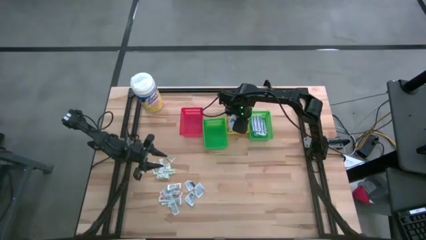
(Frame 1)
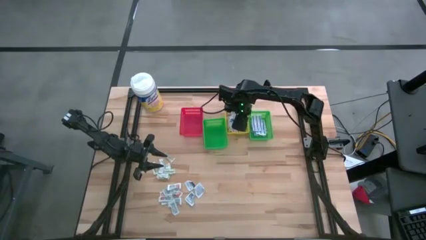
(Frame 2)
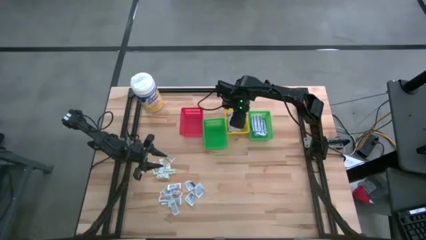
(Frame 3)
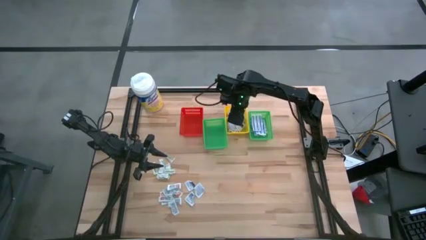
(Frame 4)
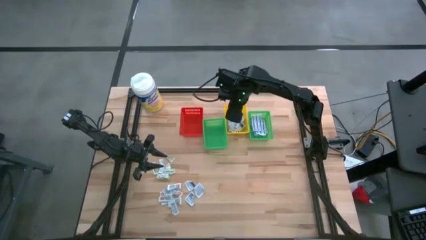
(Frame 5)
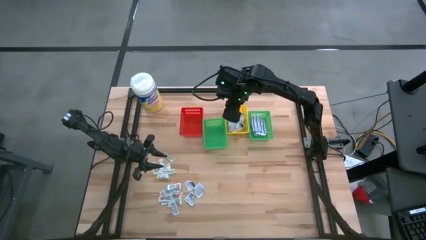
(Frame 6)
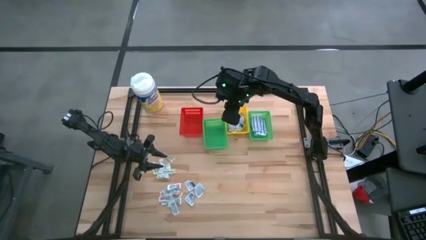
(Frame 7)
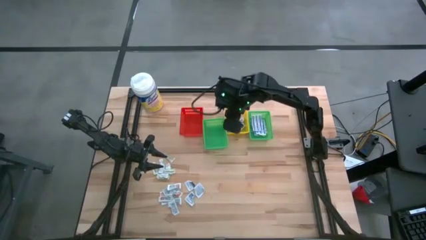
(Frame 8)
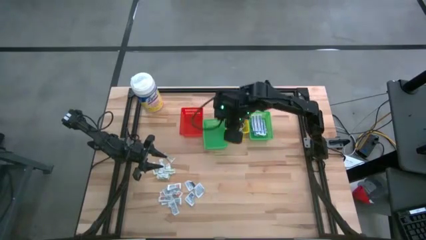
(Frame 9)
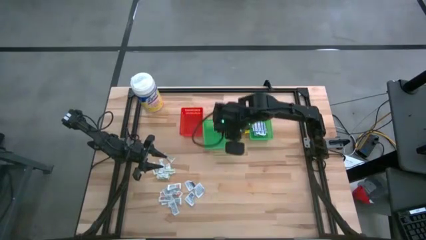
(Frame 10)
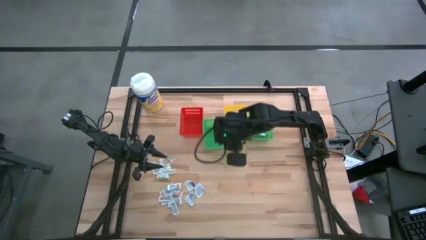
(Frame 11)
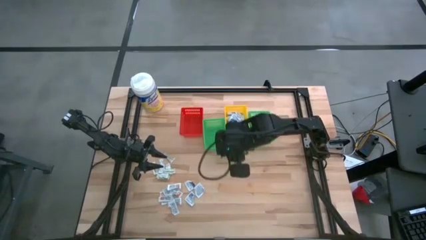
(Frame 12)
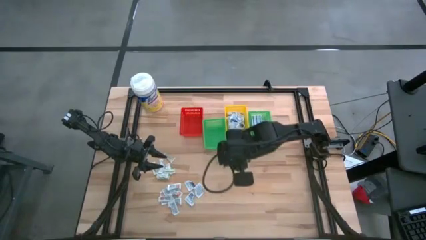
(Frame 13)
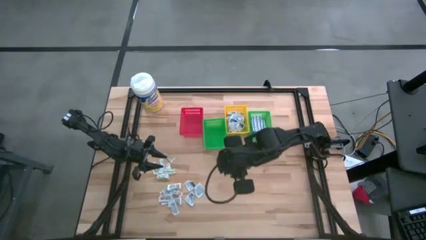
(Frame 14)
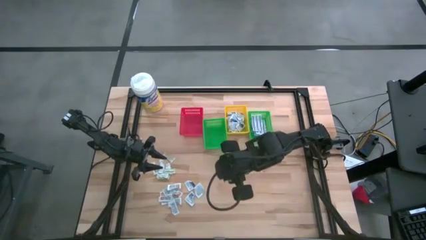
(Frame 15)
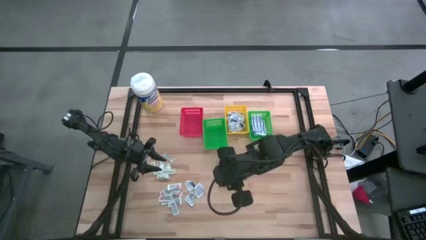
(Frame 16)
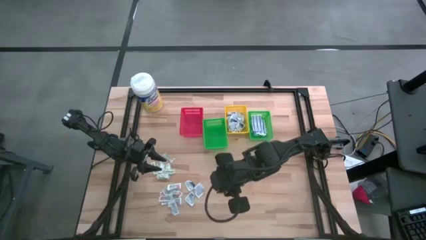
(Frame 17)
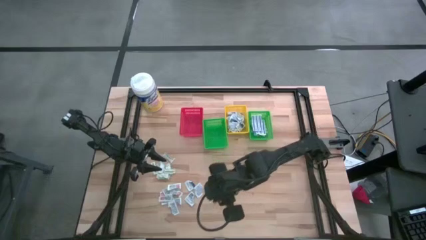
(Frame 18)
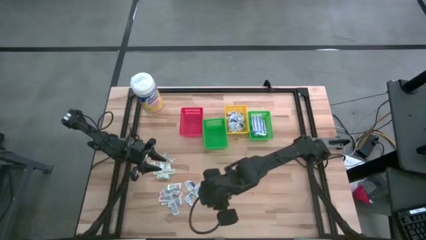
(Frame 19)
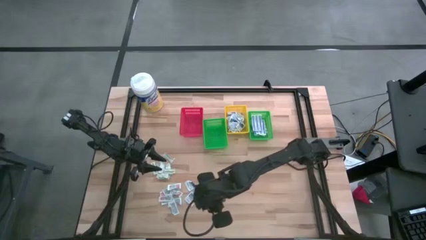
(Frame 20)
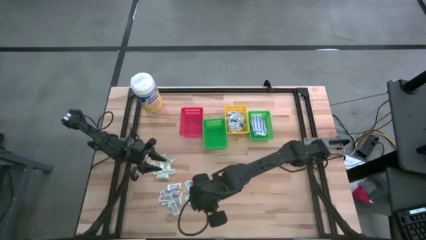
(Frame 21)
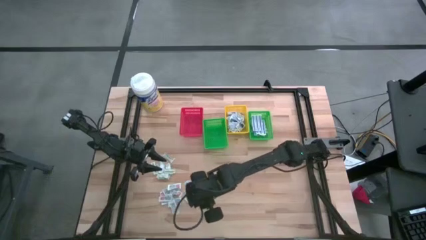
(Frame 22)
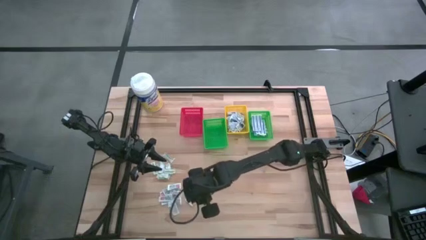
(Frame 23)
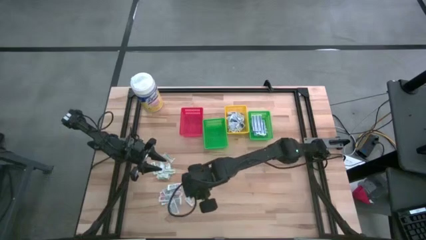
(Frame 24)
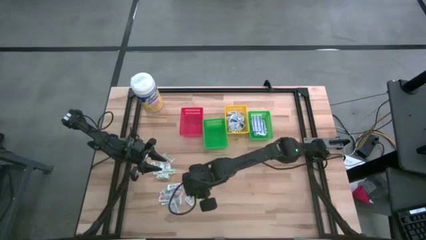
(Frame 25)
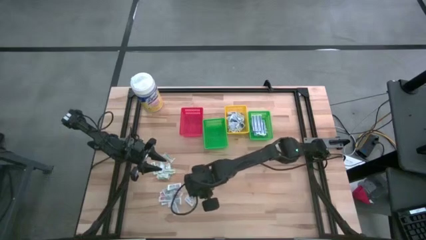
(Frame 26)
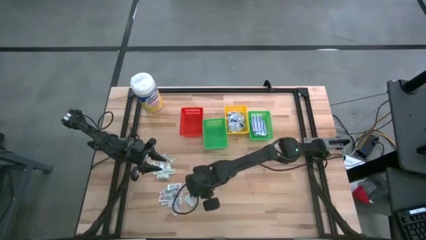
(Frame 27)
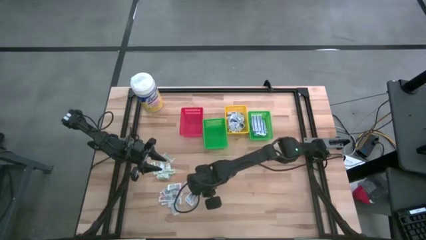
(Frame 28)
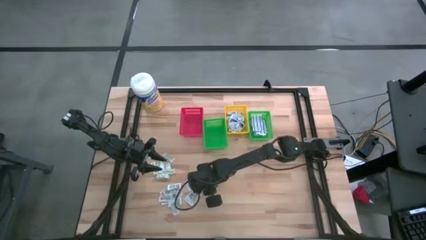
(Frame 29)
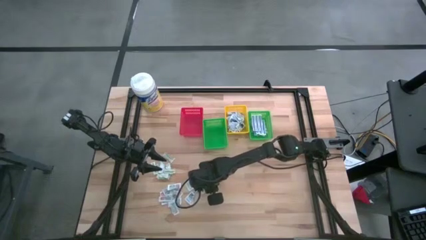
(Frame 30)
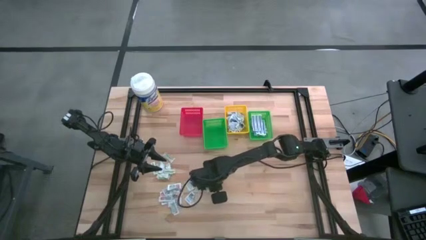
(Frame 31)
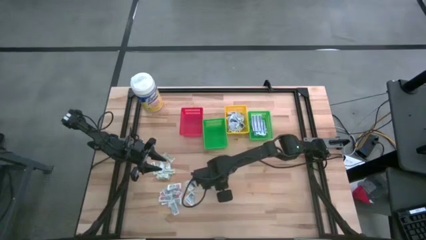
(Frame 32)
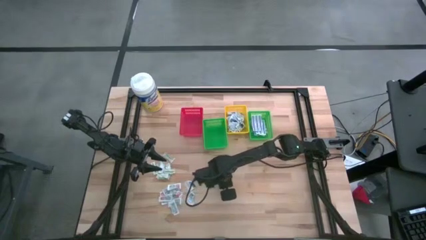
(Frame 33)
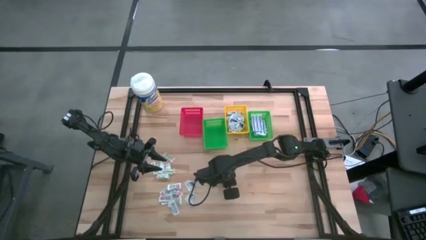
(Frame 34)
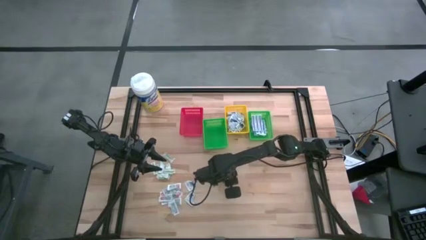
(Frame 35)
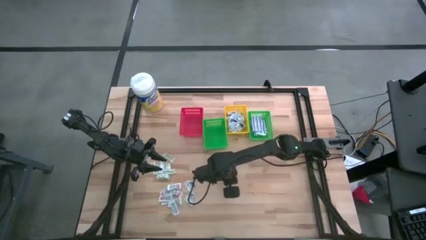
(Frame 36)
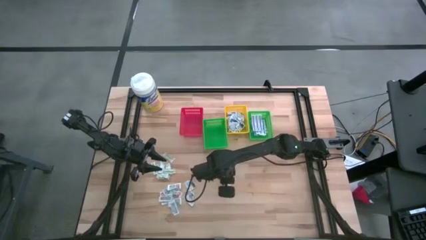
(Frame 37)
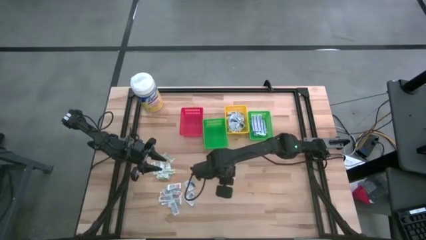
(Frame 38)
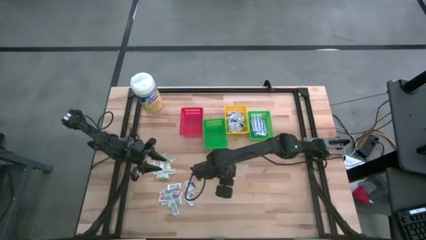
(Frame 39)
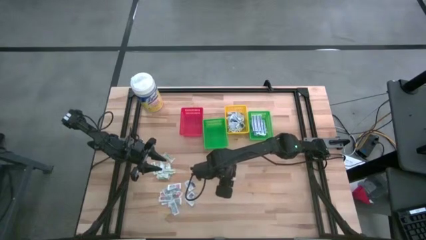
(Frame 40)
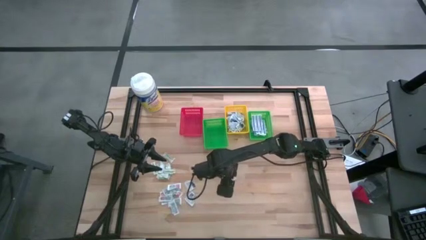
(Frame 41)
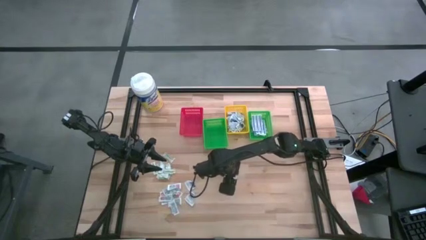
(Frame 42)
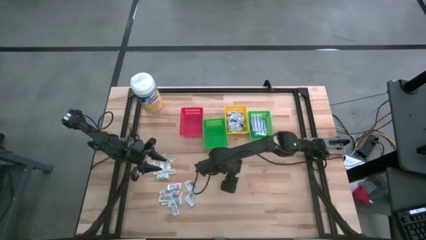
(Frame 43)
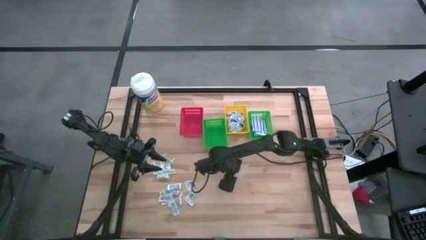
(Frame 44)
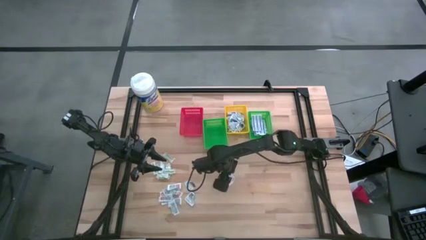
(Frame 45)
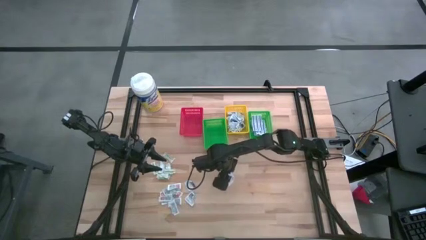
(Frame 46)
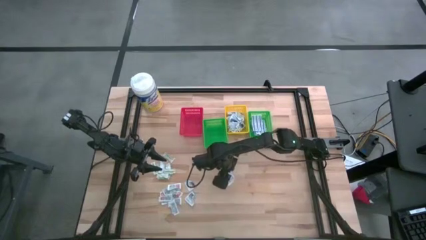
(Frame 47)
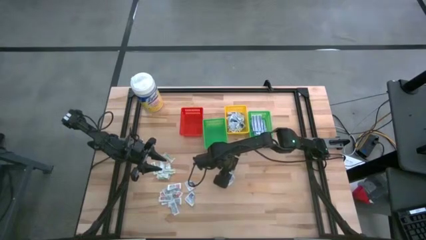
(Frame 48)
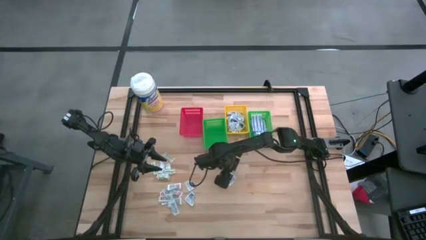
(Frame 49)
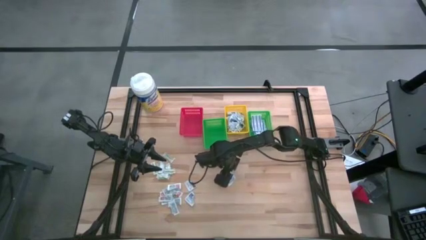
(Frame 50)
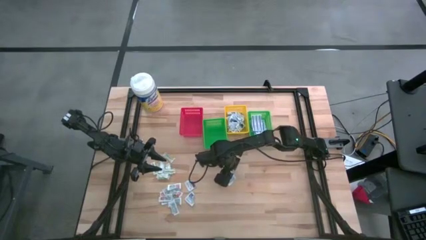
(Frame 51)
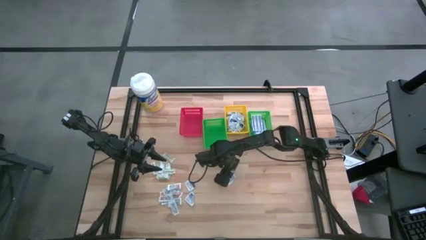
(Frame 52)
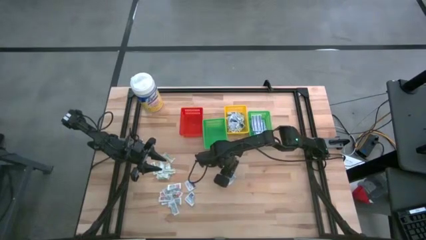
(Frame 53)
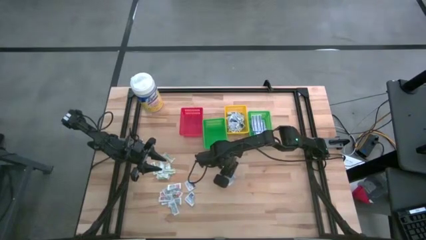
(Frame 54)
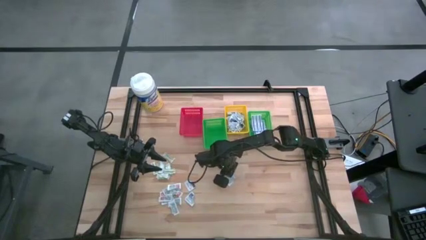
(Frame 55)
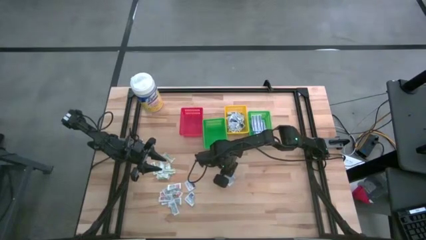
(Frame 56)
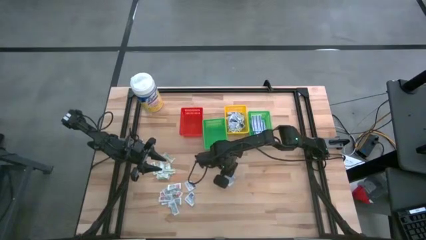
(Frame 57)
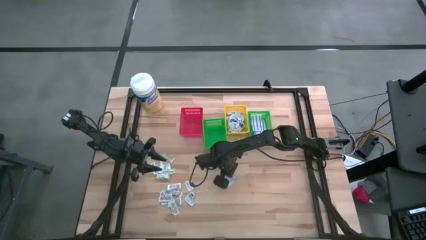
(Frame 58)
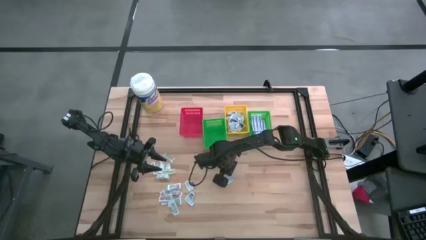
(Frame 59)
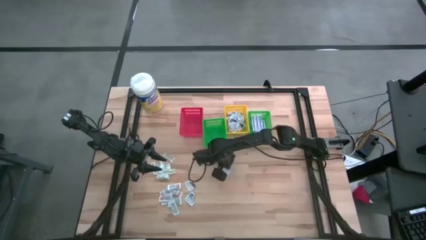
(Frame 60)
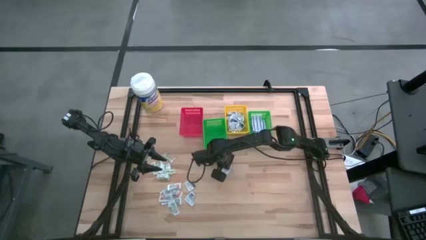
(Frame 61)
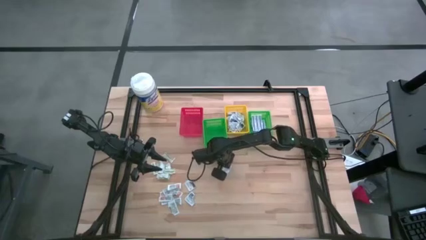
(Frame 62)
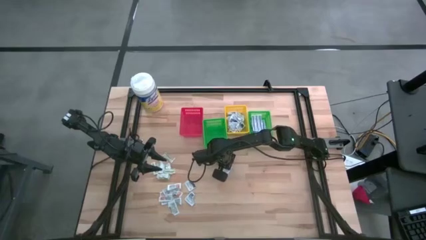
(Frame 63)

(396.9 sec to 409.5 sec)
Task: Pick & Place First Aid Supplies
Put the alcohol pad into the yellow basket

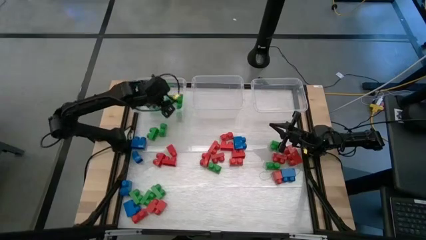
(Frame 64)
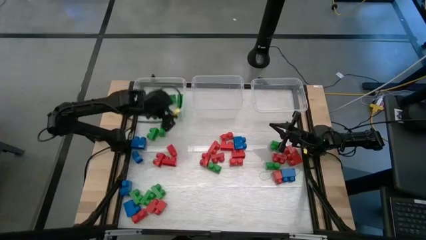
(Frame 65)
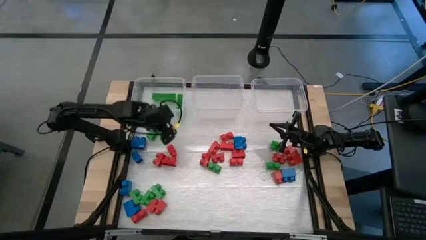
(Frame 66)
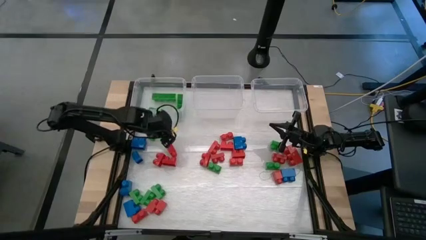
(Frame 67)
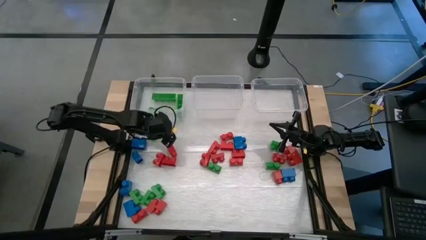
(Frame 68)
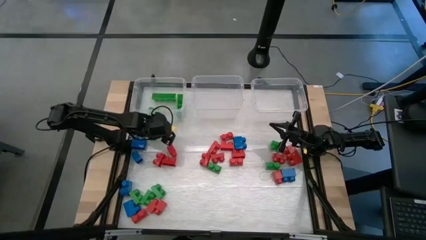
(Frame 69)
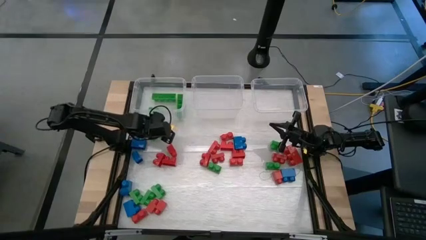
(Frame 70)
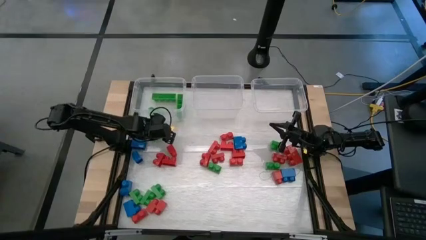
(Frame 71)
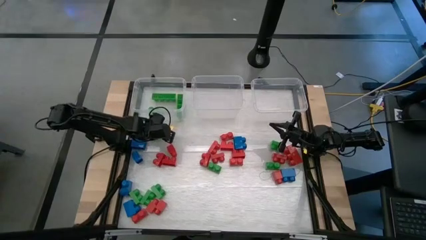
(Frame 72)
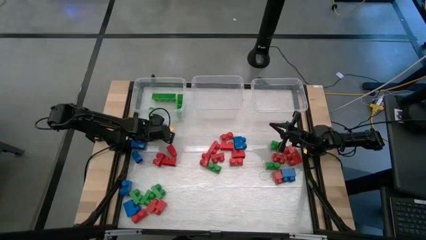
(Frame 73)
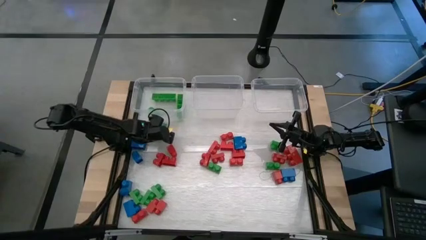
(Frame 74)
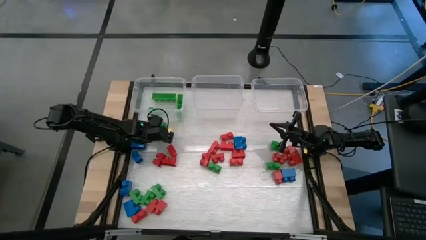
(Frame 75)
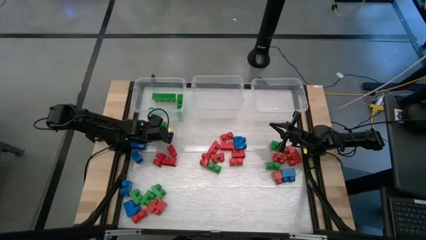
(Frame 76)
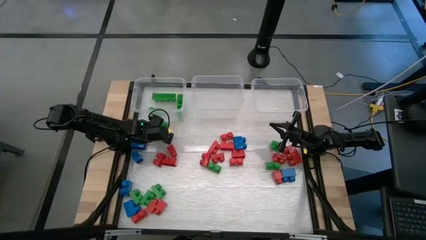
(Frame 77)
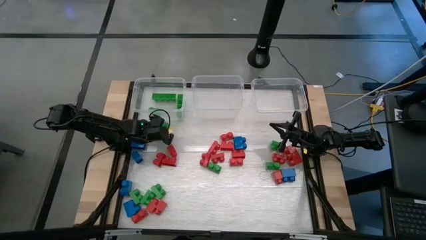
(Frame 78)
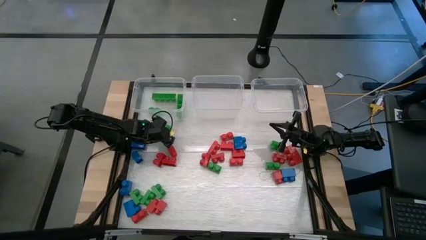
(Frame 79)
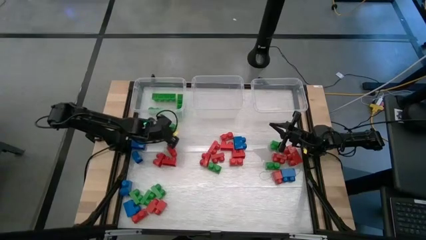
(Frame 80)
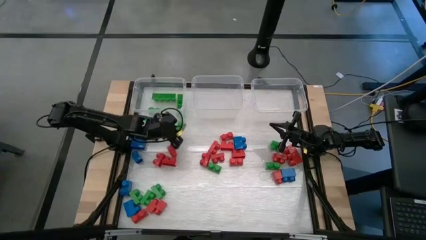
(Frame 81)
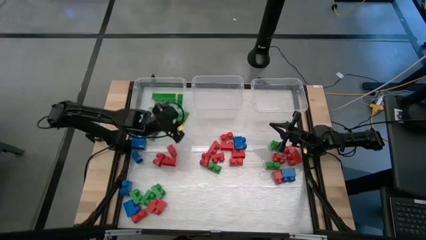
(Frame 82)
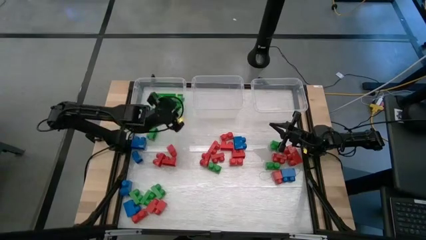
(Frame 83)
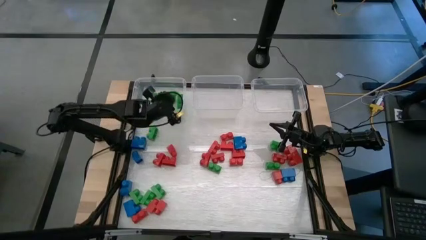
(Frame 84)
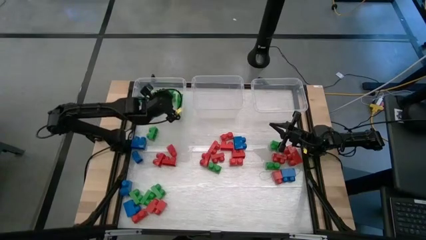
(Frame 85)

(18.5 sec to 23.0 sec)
Task: Sort blocks
Put the green game piece into the left transparent bin
